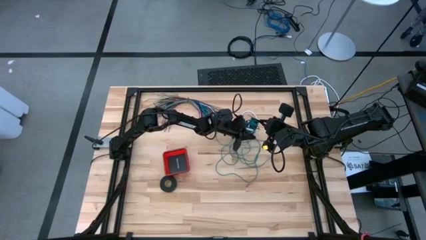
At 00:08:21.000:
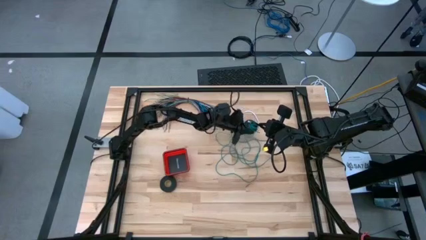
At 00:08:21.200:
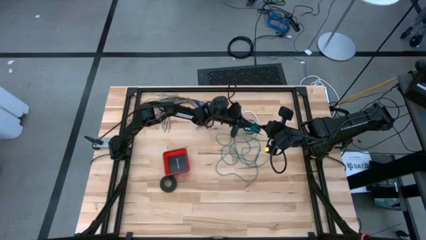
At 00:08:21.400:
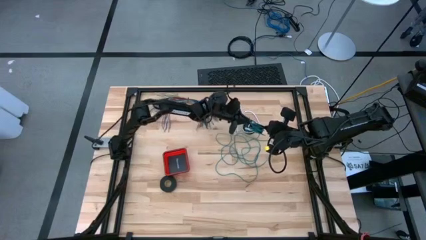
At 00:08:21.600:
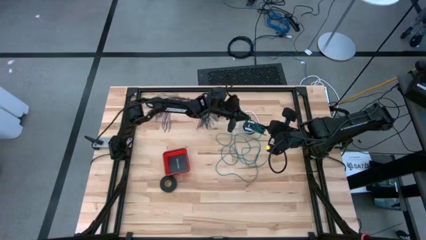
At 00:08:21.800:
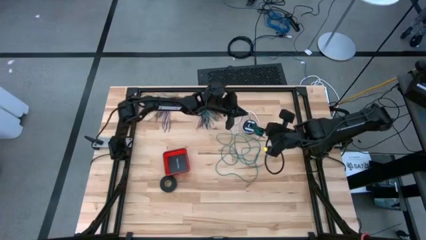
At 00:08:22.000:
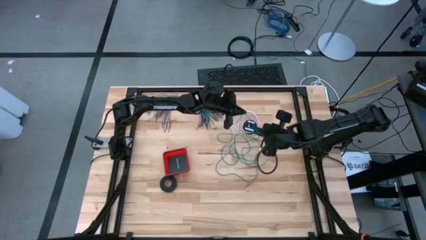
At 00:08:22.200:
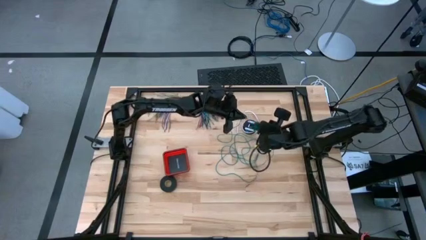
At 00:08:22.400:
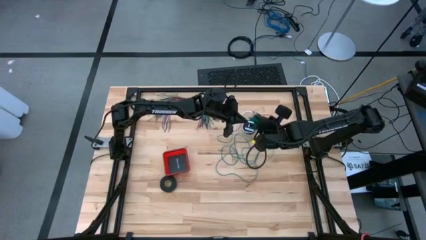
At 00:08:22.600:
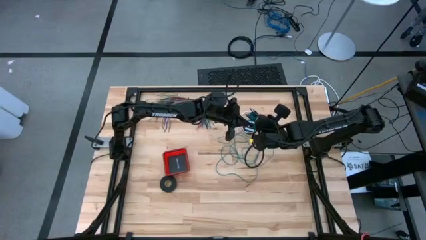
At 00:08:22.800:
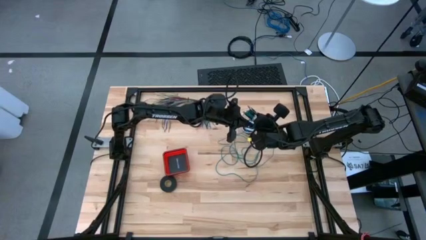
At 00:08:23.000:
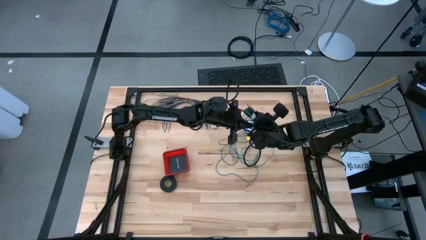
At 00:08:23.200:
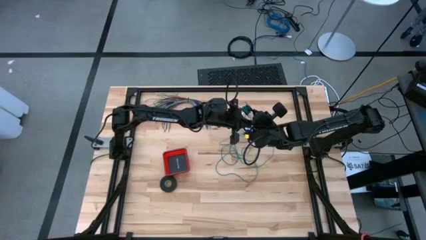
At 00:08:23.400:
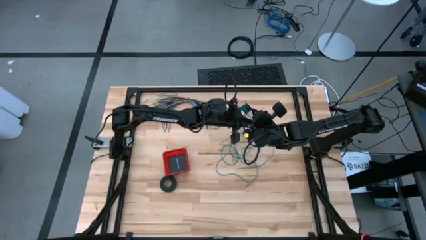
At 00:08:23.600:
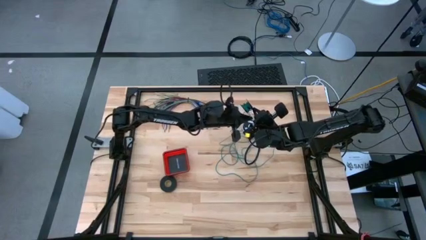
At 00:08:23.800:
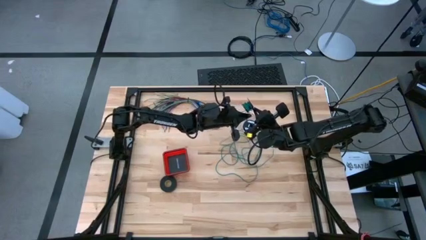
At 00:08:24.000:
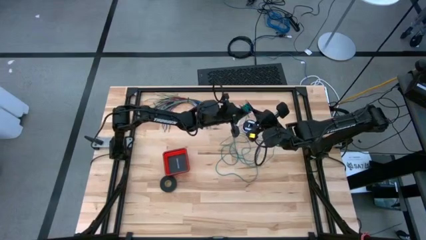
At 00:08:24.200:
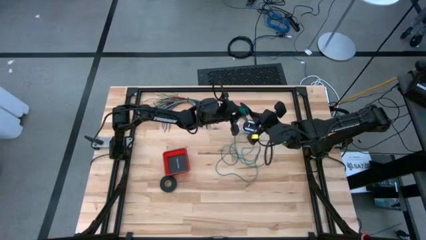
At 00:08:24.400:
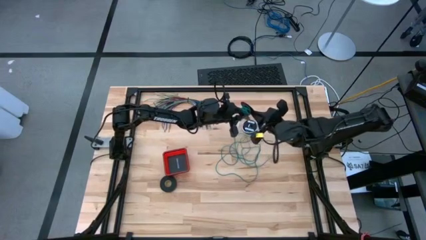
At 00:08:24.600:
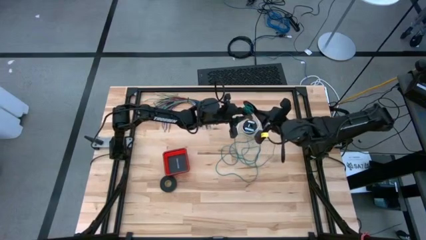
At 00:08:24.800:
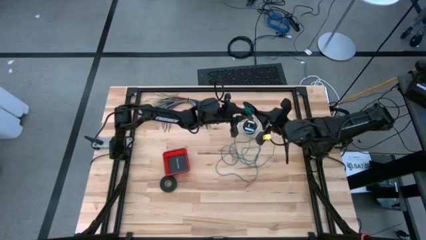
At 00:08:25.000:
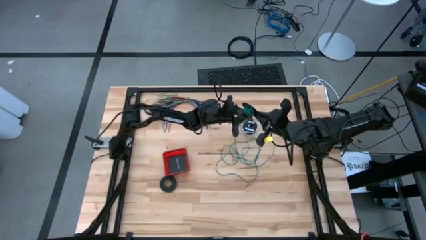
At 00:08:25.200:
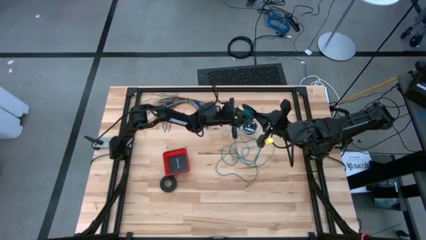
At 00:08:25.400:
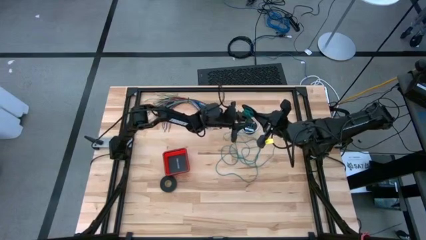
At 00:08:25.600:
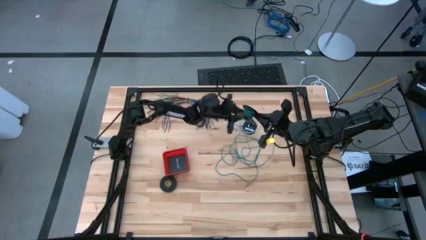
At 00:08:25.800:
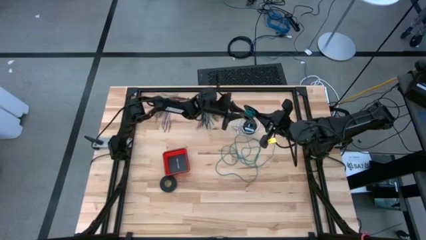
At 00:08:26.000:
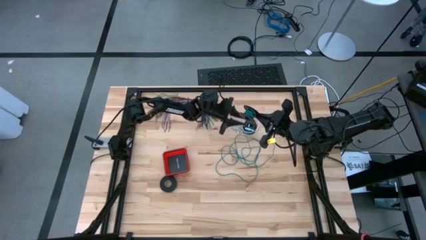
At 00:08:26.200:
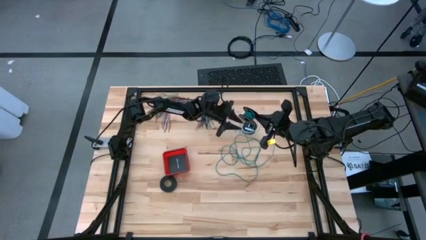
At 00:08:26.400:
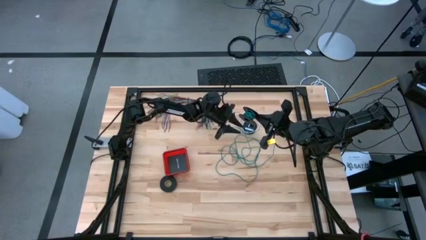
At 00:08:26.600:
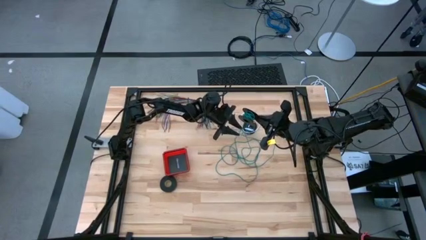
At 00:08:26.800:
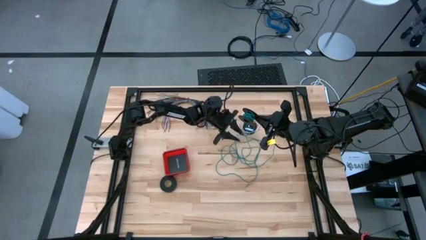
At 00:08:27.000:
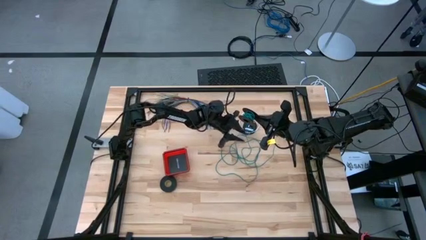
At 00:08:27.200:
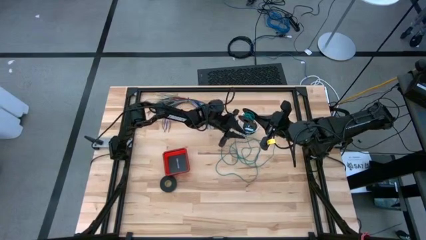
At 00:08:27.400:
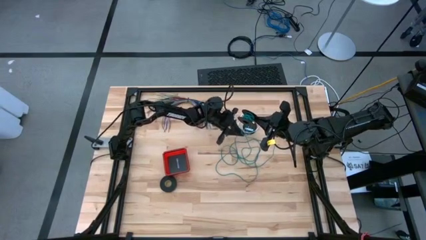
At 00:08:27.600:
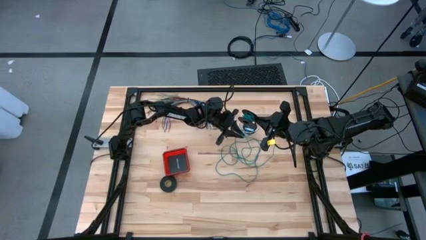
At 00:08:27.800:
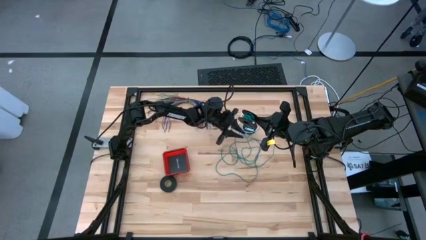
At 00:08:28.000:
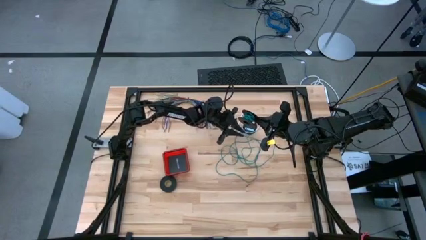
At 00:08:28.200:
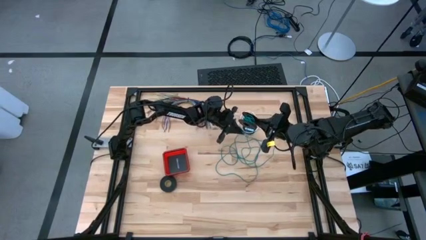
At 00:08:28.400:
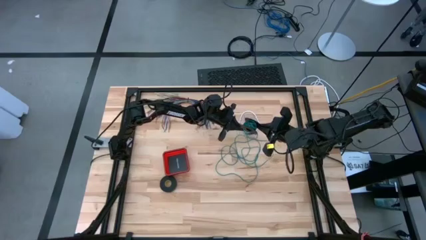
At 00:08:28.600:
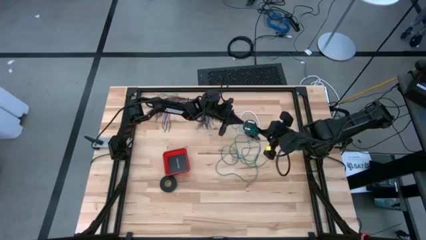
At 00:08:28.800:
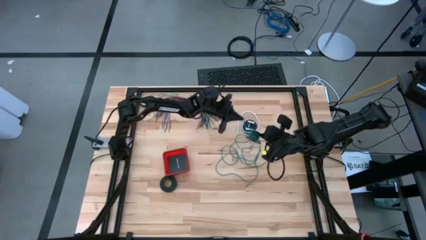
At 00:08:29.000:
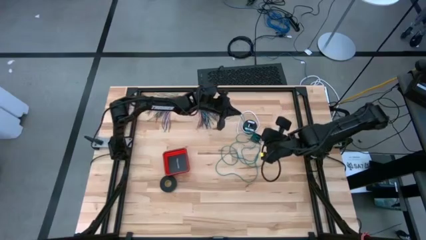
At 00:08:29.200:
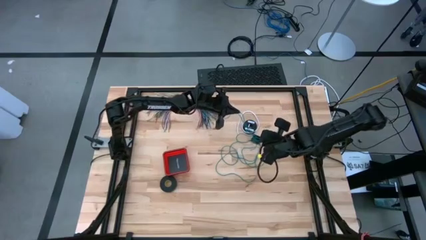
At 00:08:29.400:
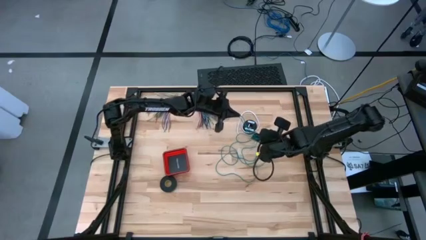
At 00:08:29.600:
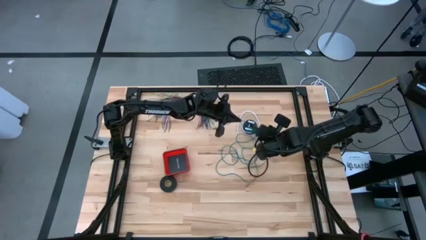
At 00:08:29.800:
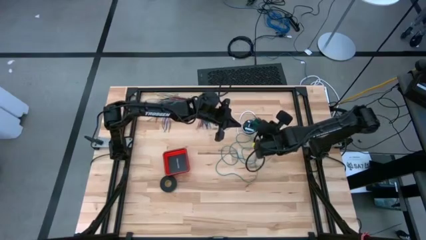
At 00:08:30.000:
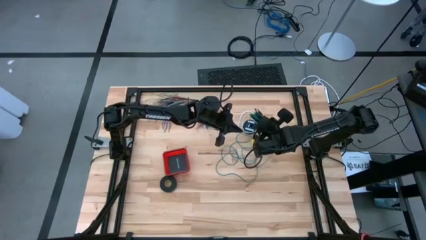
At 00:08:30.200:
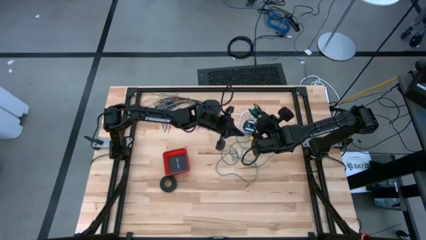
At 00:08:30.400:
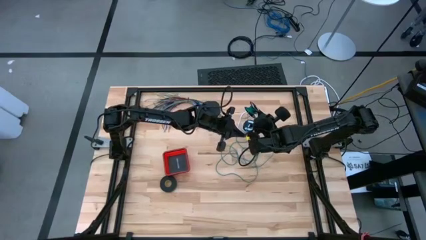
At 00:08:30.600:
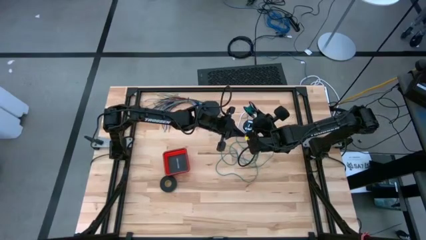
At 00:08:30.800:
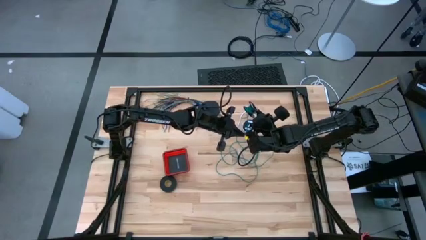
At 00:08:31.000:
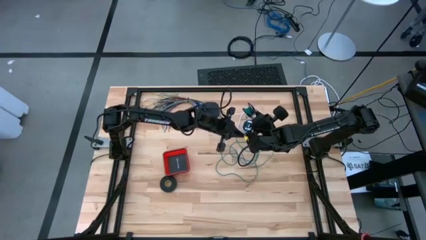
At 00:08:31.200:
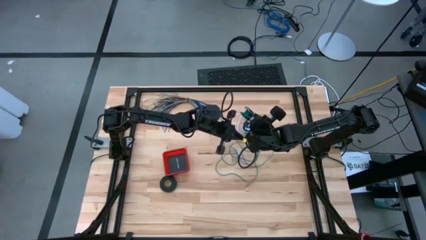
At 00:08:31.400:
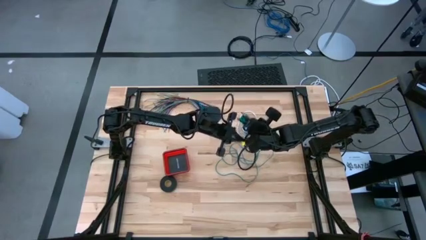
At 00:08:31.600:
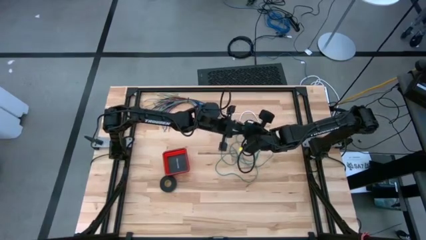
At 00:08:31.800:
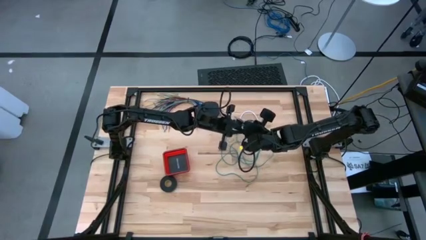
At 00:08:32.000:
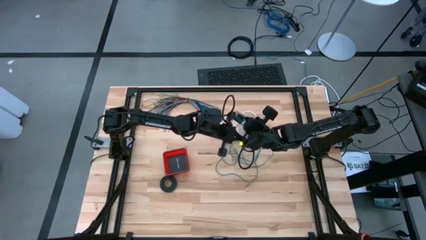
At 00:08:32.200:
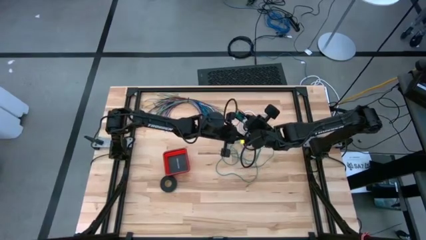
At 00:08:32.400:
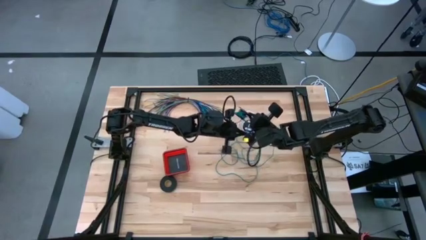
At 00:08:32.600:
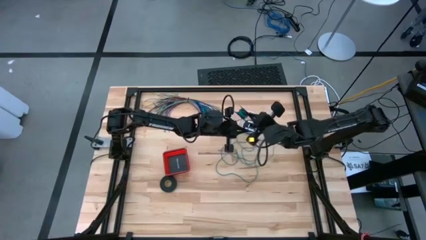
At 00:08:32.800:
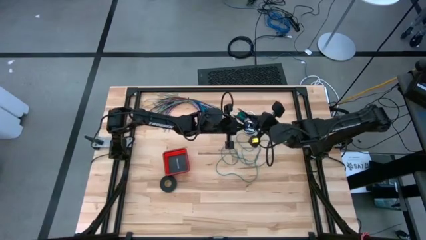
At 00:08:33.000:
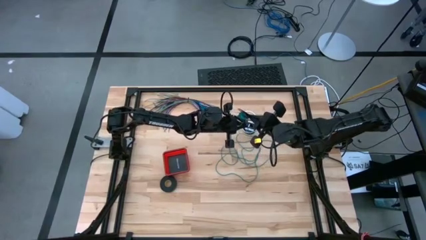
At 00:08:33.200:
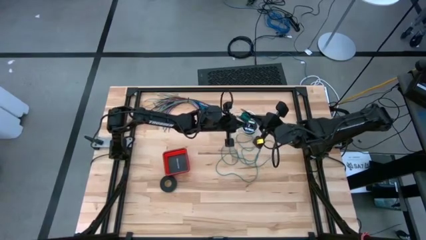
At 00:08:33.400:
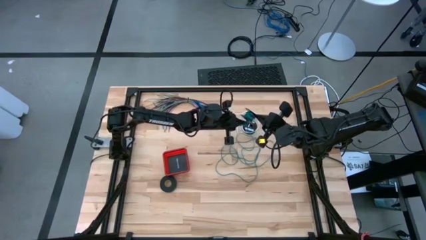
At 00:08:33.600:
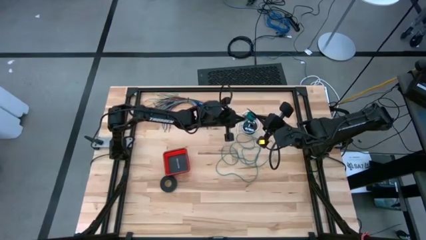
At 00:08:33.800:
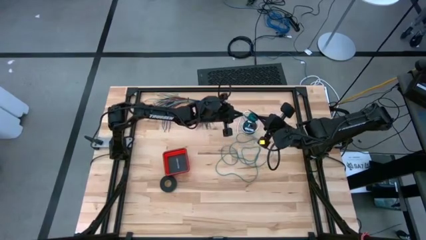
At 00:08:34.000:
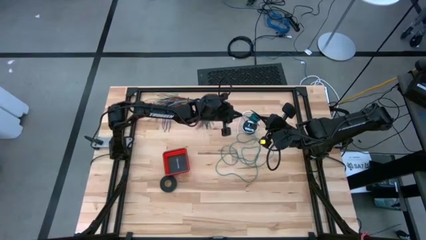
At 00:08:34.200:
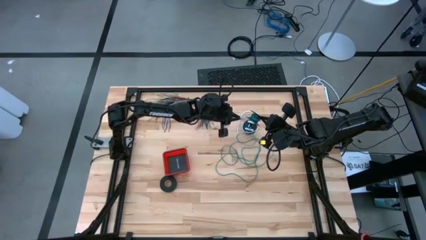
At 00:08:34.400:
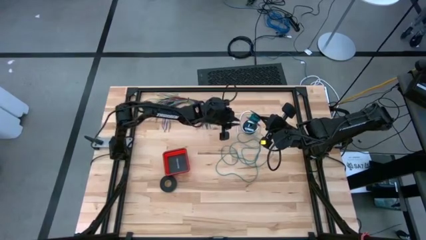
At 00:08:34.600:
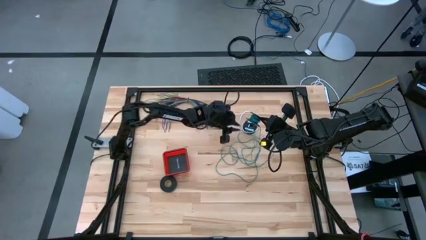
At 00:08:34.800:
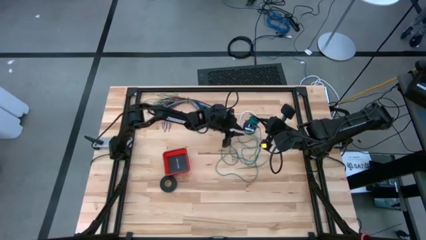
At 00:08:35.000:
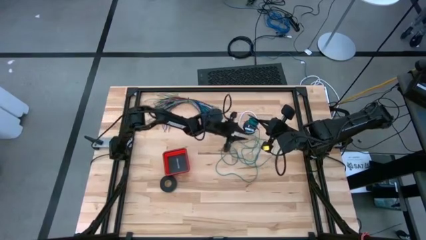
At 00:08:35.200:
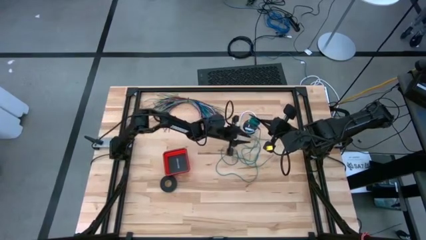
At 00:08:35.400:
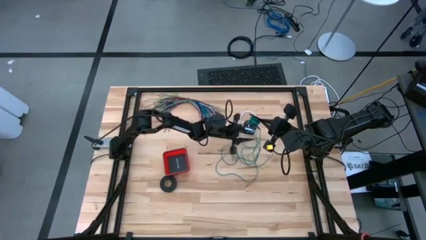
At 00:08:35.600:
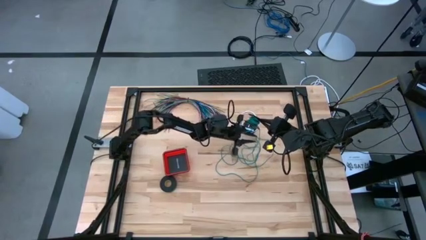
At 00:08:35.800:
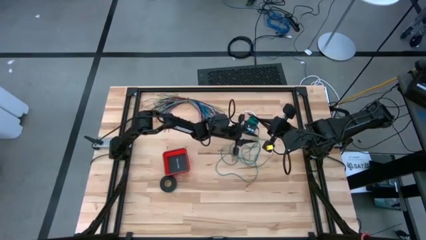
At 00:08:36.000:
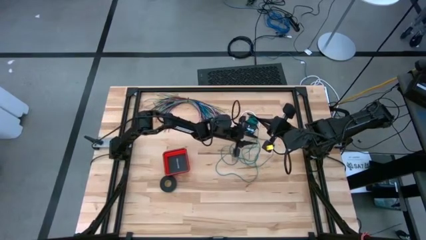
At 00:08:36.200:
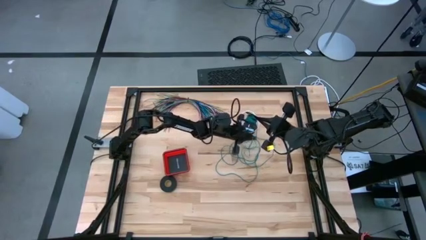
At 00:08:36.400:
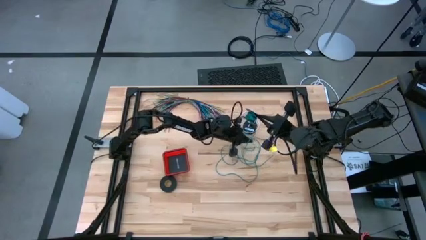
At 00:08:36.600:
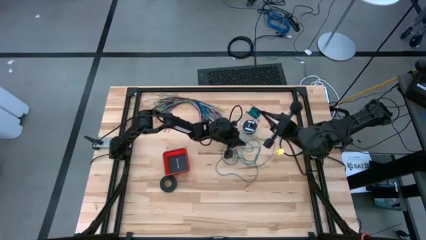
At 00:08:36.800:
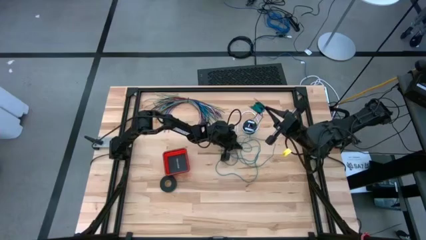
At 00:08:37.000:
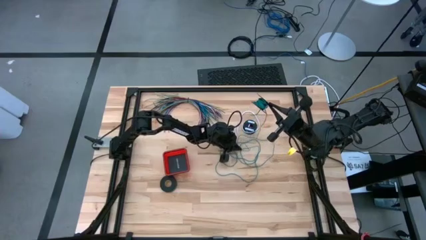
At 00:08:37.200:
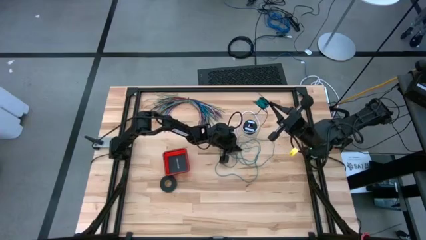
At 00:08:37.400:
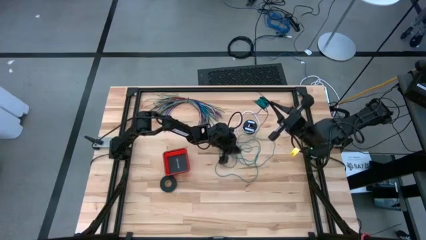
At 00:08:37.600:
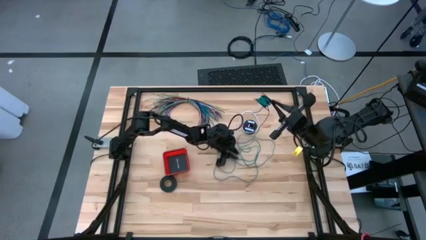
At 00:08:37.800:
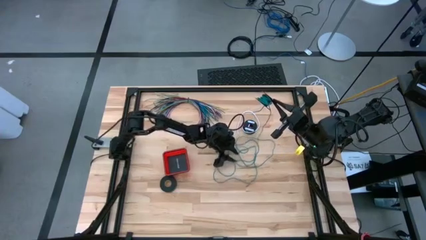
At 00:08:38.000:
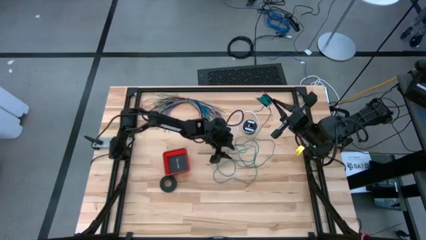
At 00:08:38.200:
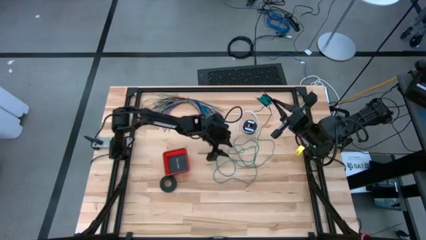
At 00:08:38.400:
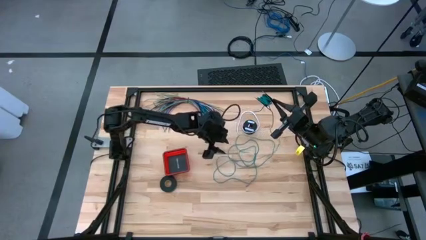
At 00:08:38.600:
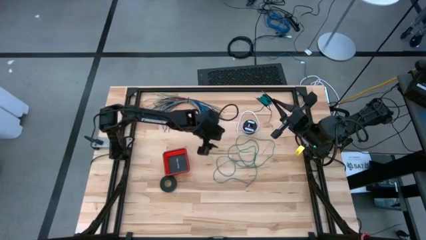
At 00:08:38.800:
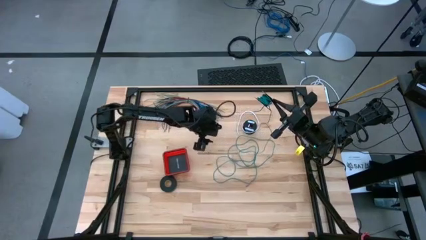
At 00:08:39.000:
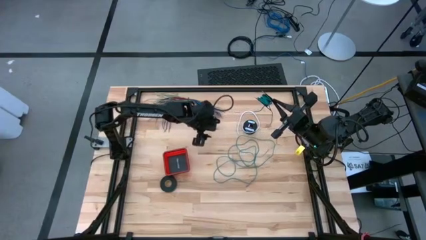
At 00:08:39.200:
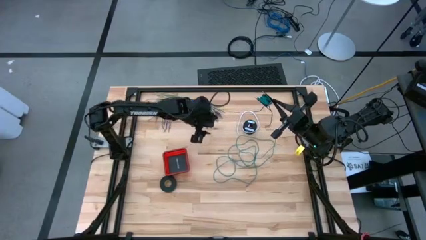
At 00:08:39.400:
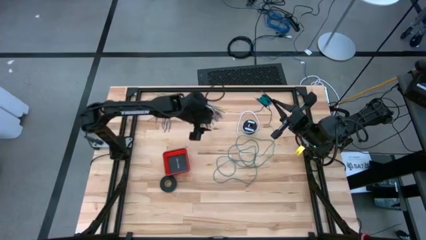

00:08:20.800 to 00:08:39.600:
Task: Coil cords
Coil the green wire onto the spool
